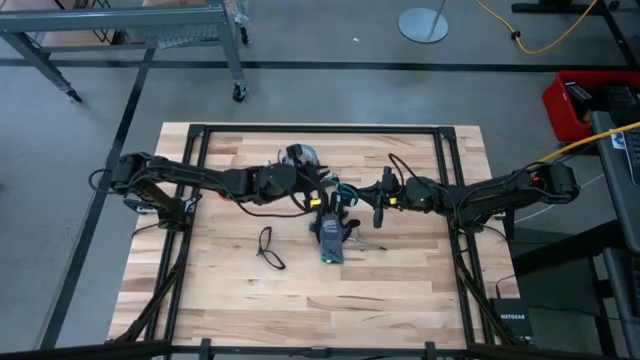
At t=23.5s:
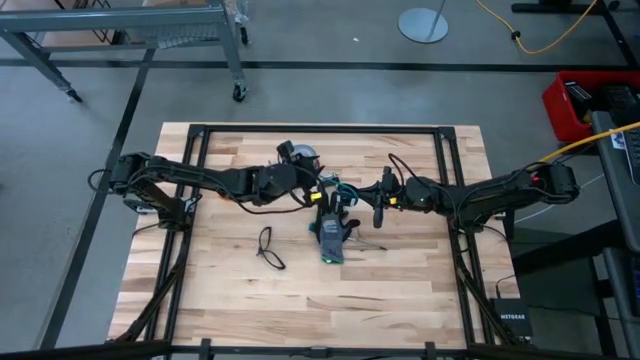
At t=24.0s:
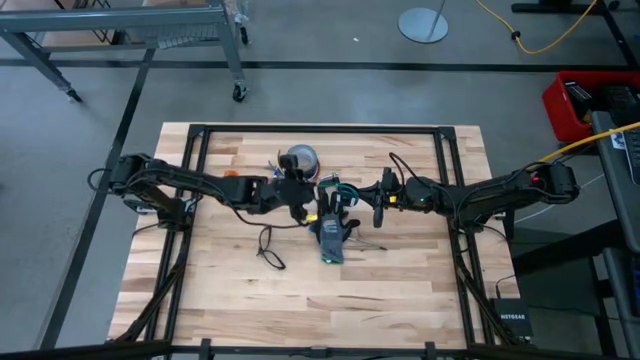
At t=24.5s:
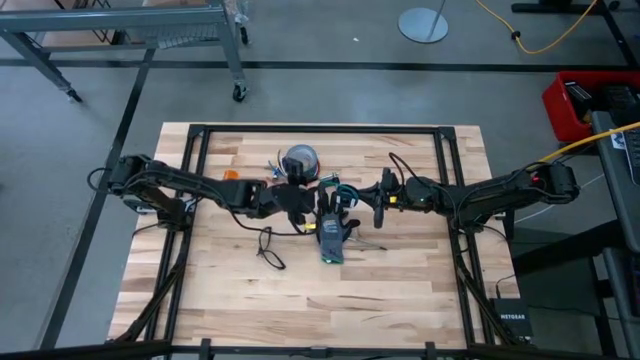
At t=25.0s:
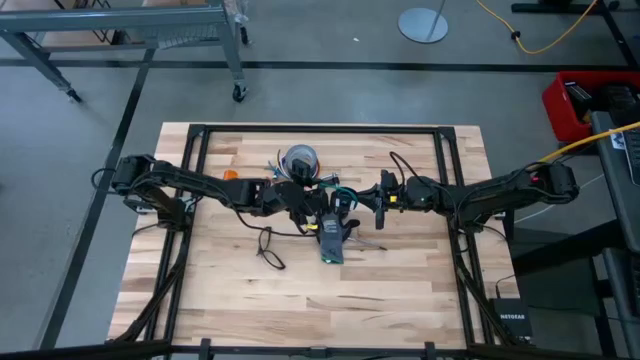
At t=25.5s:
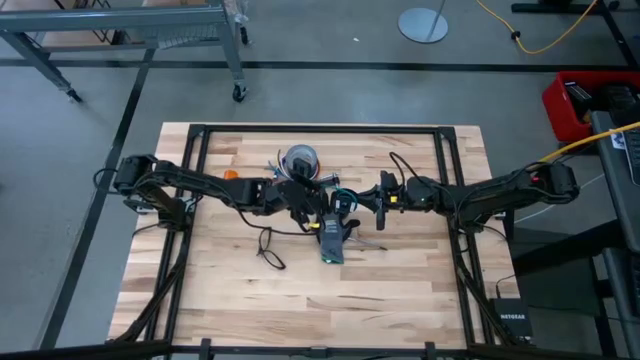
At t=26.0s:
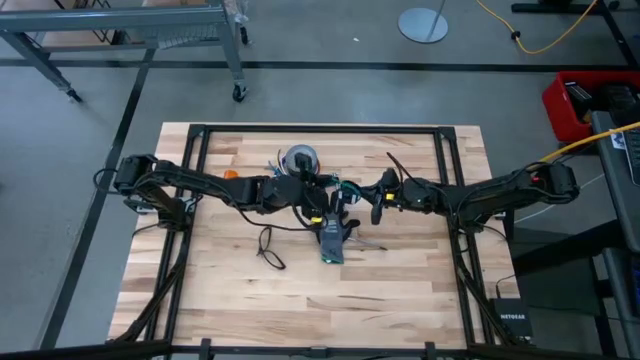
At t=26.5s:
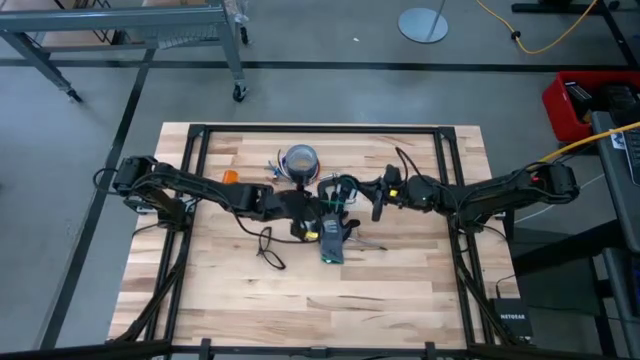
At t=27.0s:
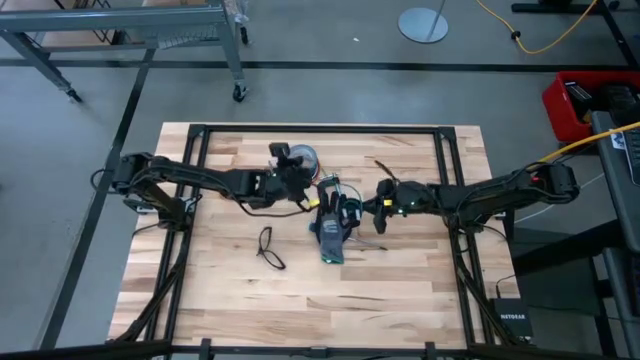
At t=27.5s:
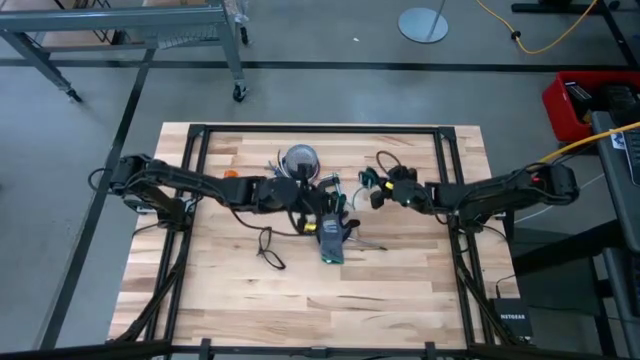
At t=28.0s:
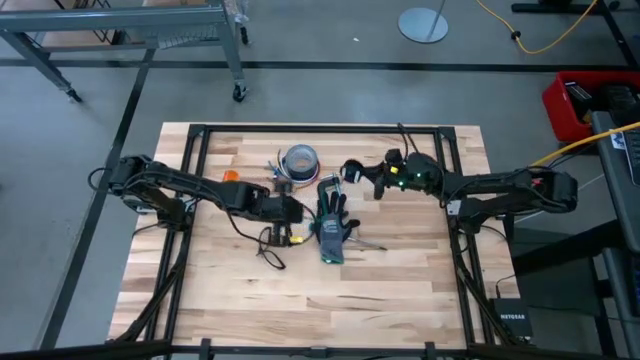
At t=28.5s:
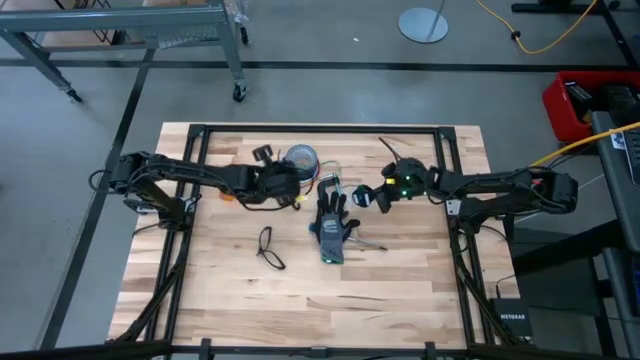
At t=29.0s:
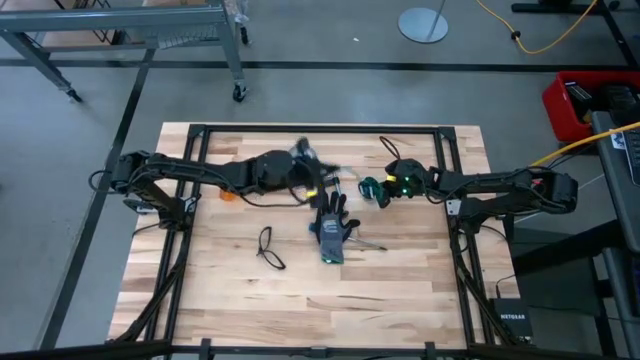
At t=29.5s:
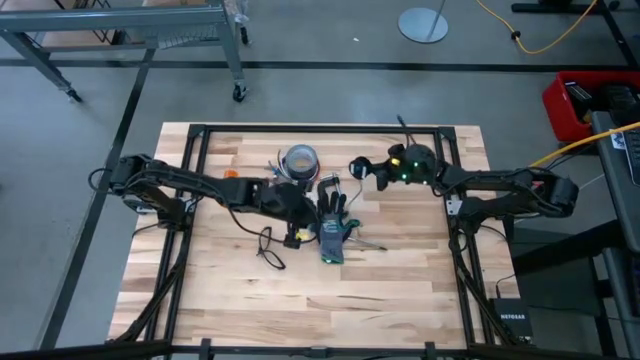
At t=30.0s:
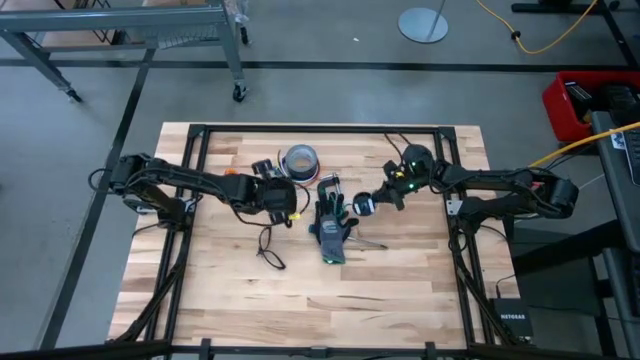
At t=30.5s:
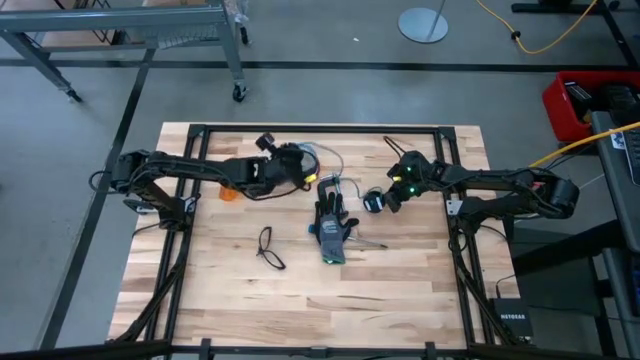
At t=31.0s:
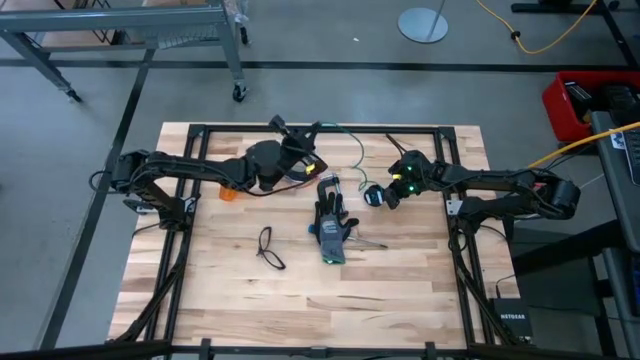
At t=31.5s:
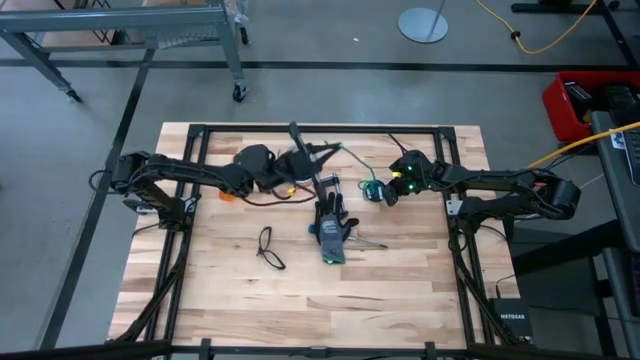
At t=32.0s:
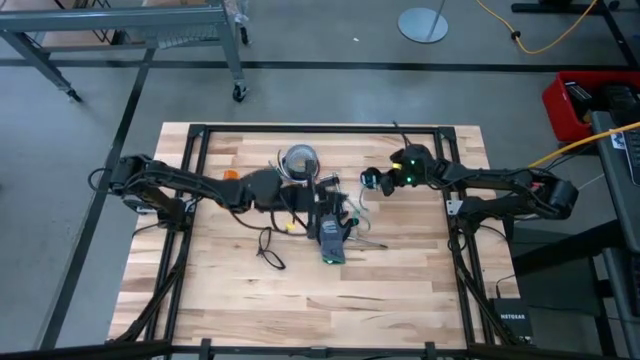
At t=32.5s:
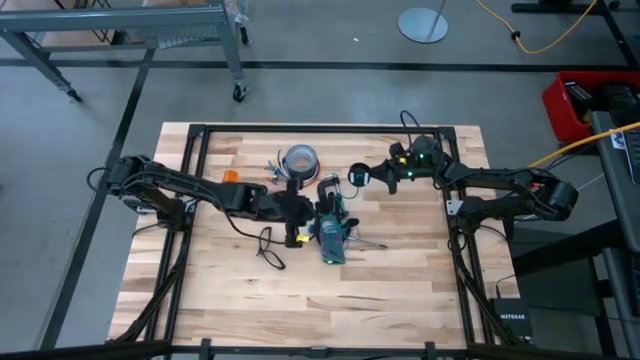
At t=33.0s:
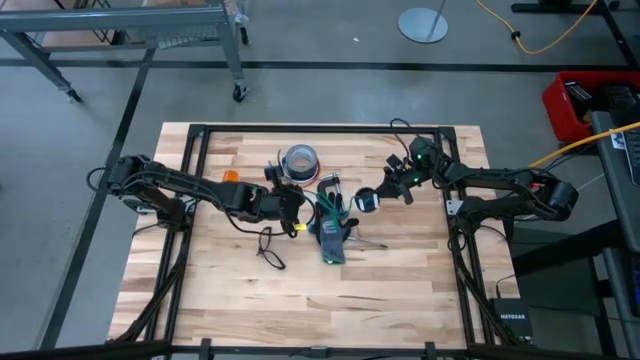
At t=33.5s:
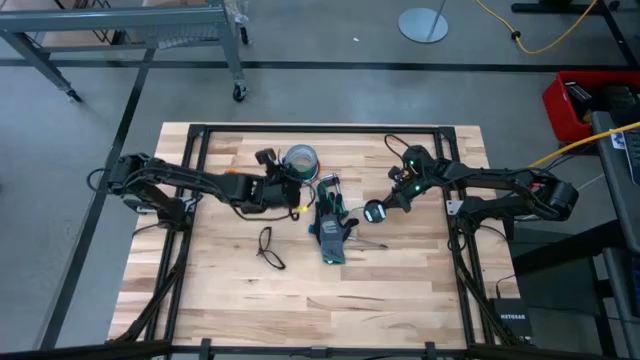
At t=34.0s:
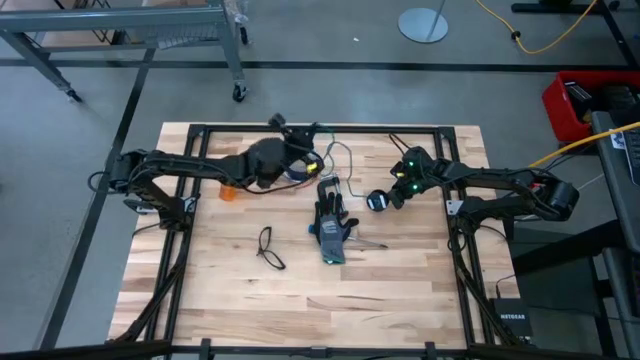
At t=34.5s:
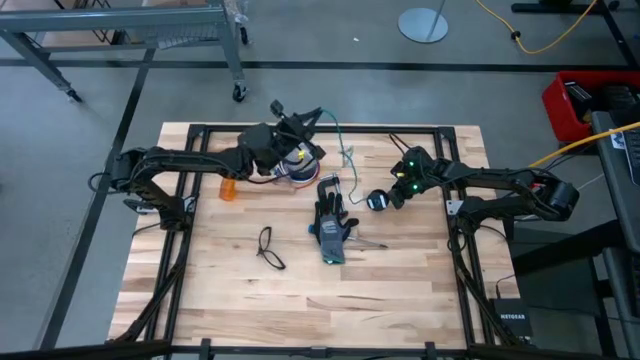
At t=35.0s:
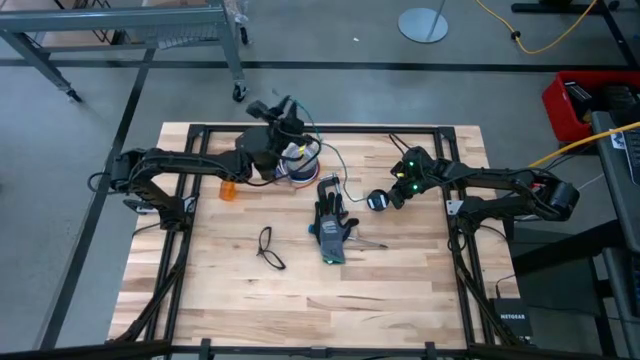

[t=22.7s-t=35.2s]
Task: Coil cords
Uncoil the green wire from the black spool

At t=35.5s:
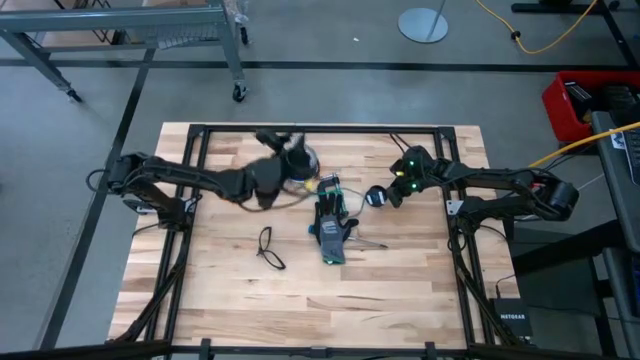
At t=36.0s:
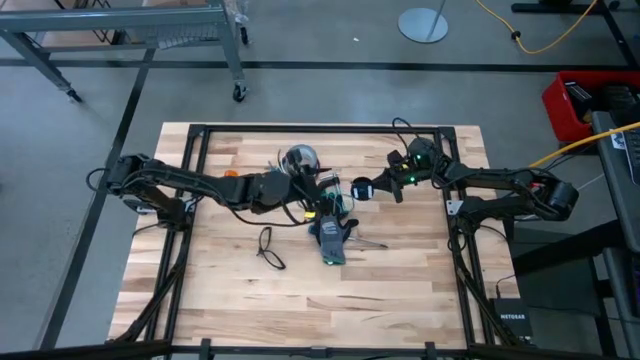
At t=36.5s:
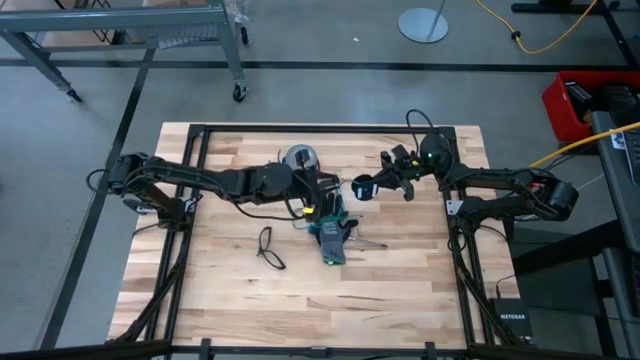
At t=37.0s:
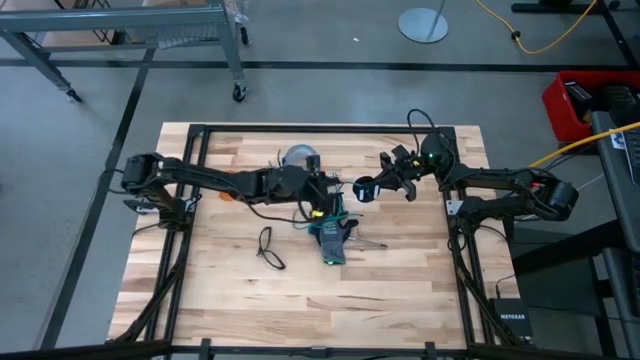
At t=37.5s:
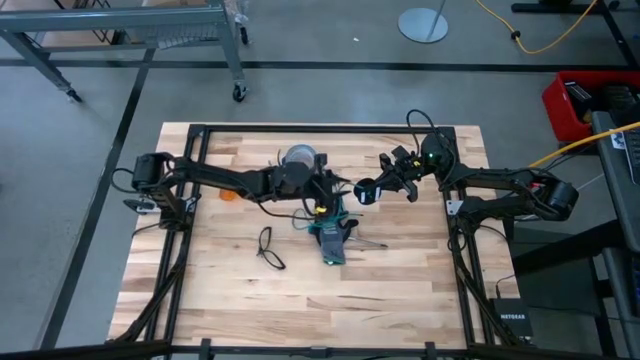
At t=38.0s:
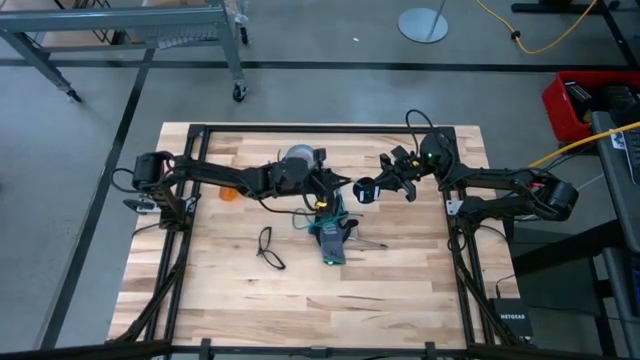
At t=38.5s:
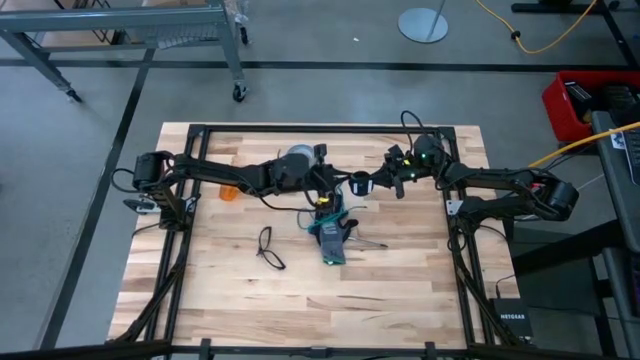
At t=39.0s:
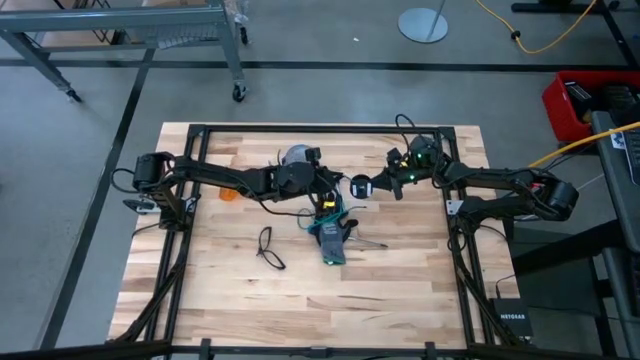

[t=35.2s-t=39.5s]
Coil the green wire on the black spool

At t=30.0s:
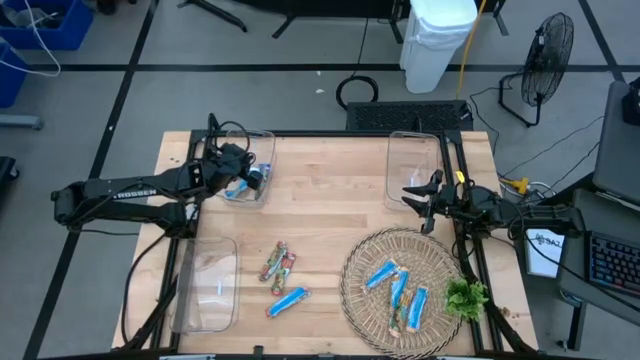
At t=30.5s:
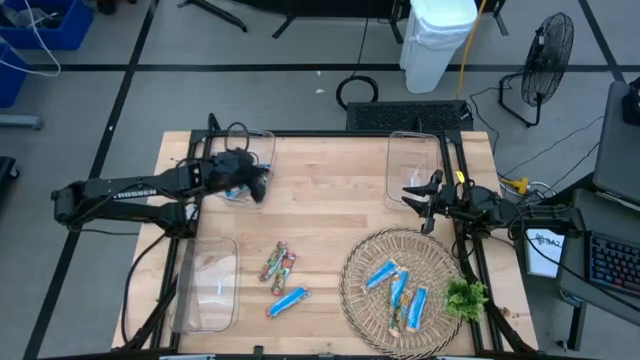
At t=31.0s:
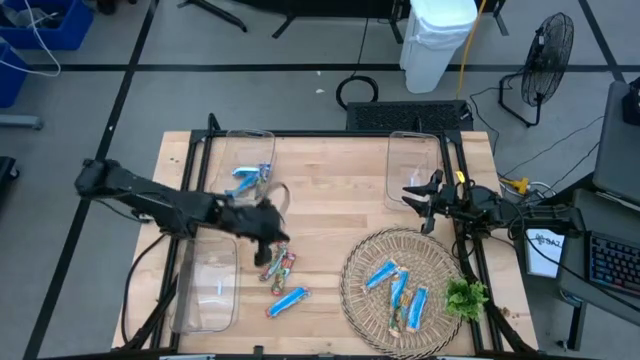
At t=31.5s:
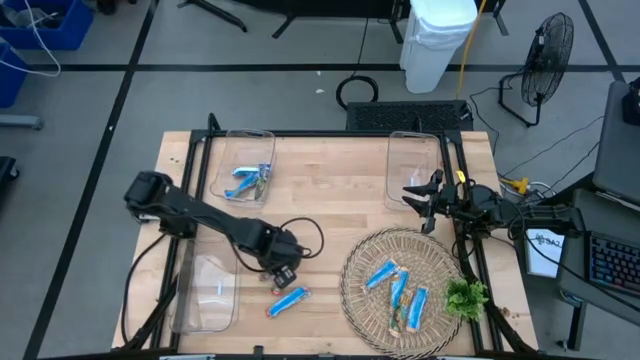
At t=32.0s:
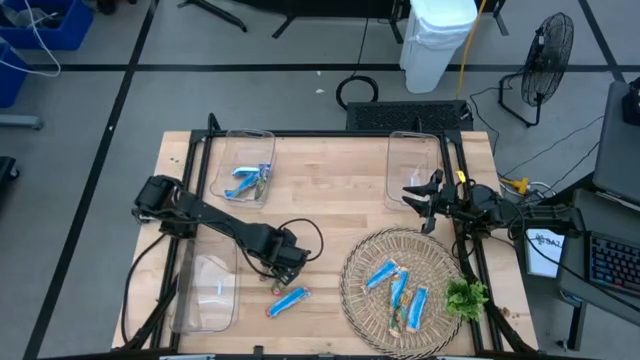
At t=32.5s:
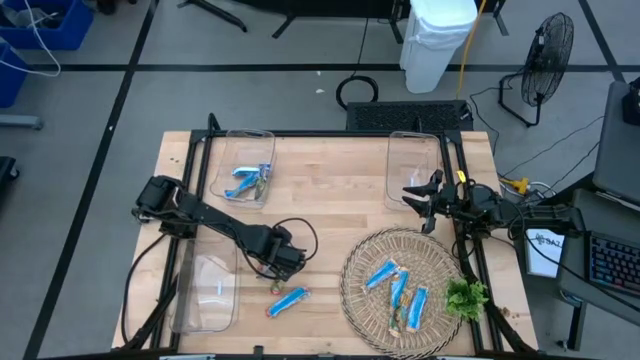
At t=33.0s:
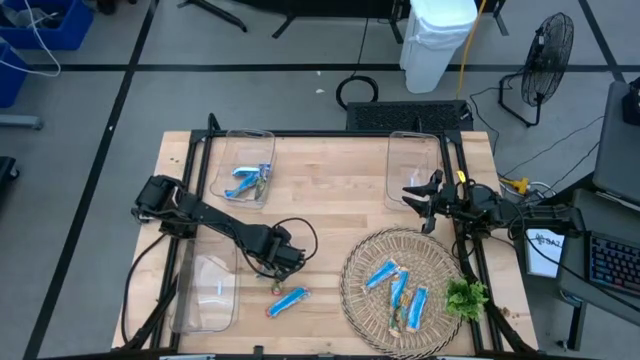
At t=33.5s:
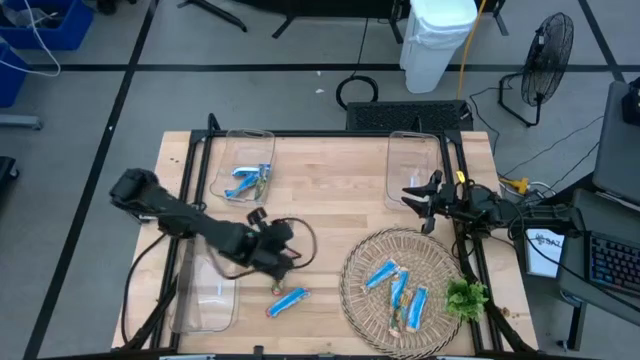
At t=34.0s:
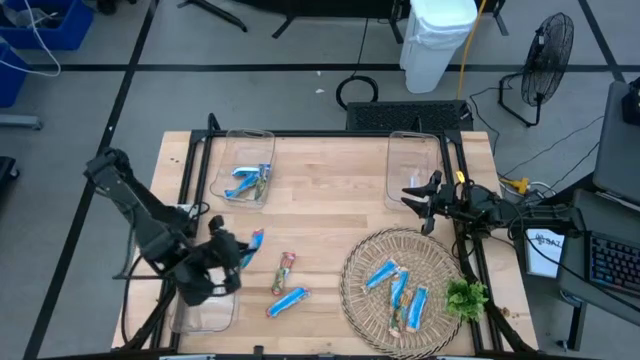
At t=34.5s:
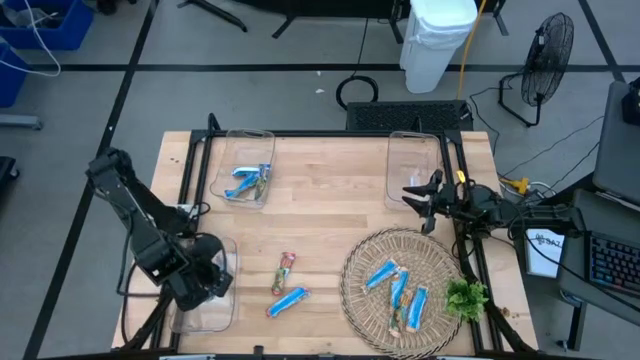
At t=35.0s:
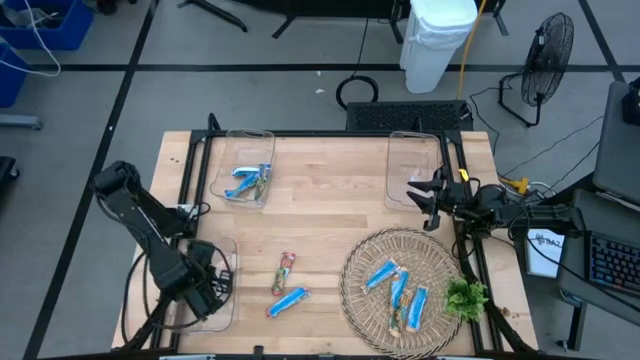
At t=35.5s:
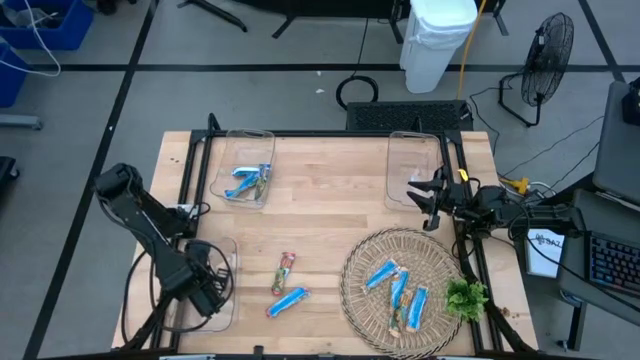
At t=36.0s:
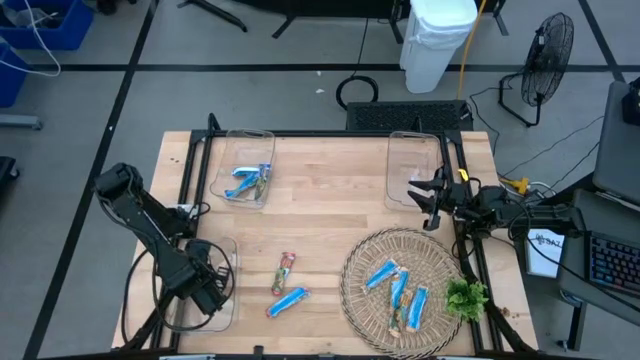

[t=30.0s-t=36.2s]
Task: Pick and place Granola Bars by type
Put the orange granola bar into the bottom transparent bin
